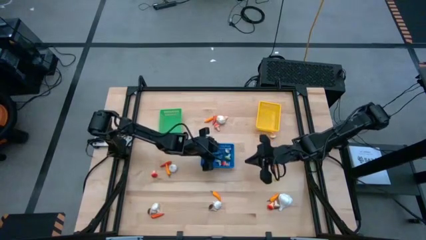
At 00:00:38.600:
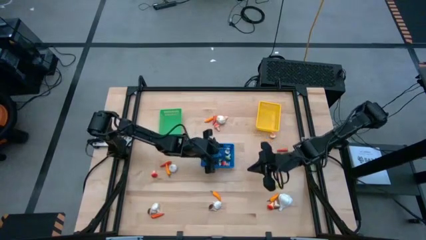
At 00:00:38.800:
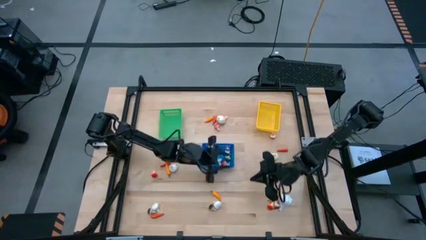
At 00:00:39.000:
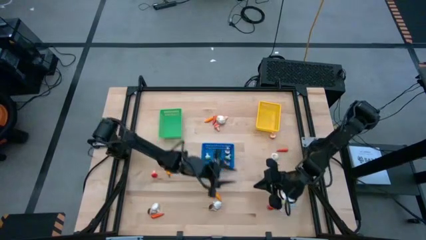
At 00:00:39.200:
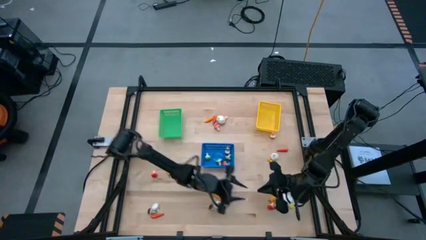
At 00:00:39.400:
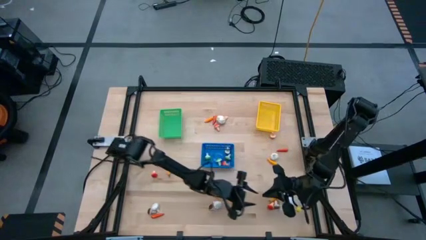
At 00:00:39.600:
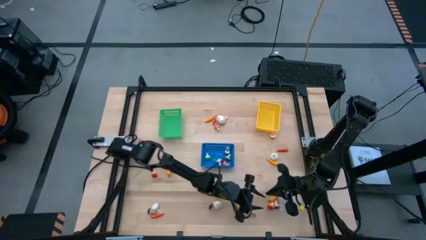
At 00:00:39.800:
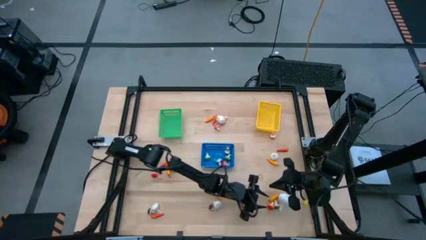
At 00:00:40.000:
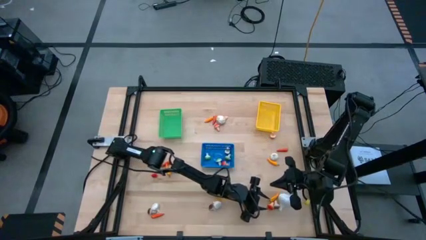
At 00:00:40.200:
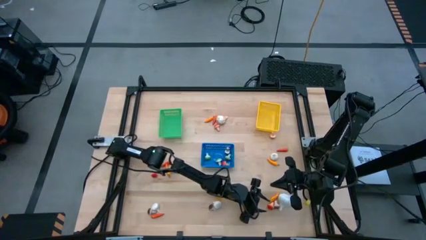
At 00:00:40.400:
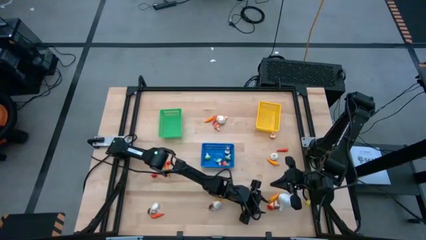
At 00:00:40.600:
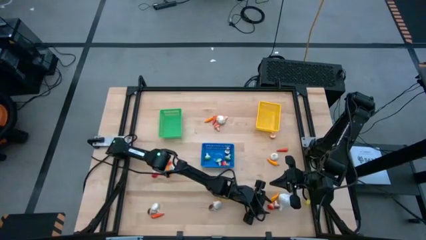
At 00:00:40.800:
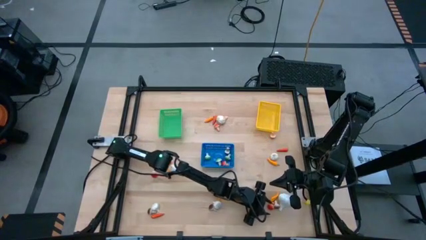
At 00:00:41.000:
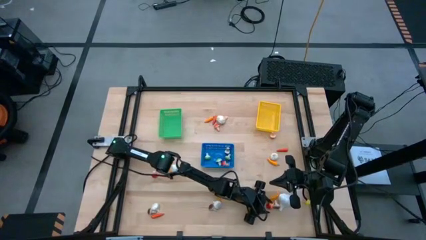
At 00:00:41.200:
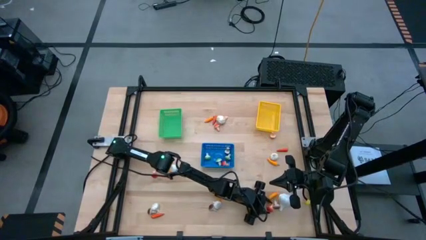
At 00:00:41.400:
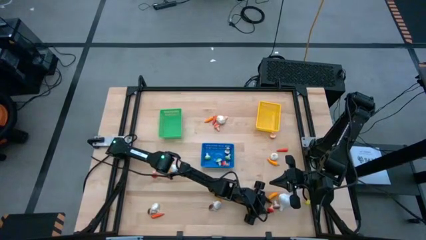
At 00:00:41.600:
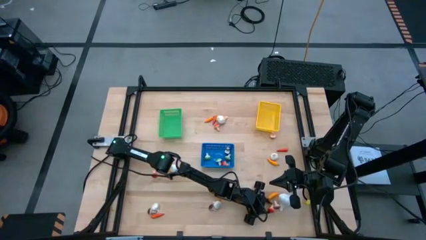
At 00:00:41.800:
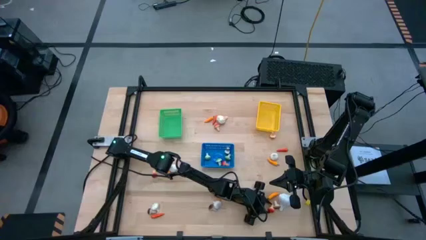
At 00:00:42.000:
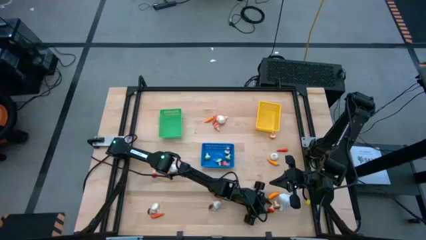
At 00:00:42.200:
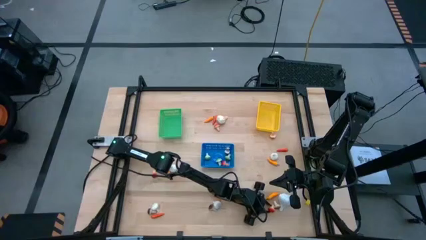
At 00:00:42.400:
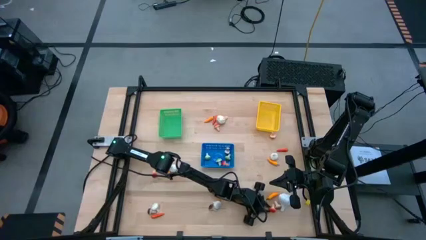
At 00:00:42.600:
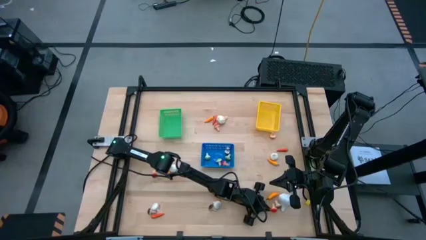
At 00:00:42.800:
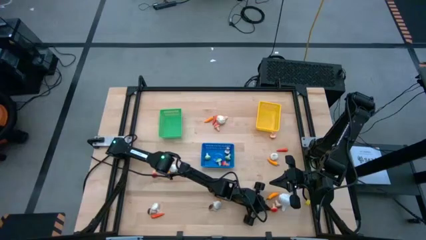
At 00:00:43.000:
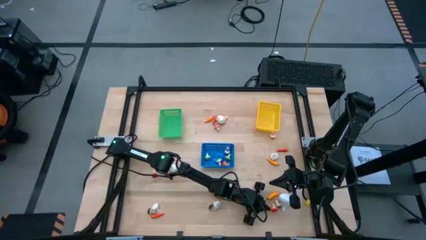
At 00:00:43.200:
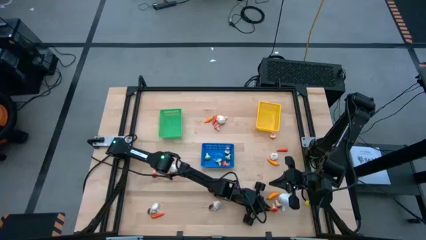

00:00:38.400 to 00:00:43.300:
Task: Sort produce into baskets
Put the orange mushroom into the blue bin

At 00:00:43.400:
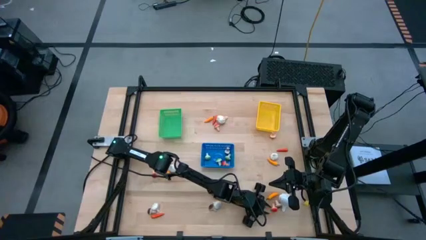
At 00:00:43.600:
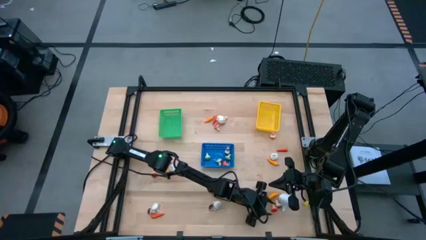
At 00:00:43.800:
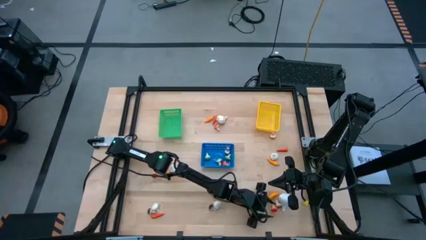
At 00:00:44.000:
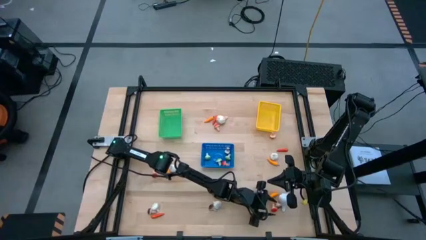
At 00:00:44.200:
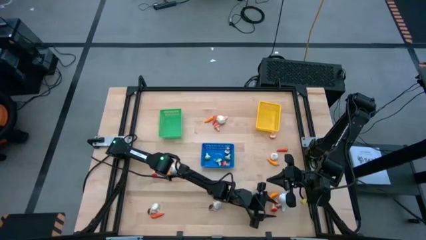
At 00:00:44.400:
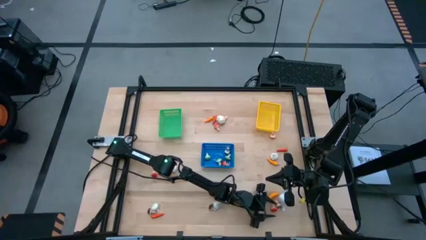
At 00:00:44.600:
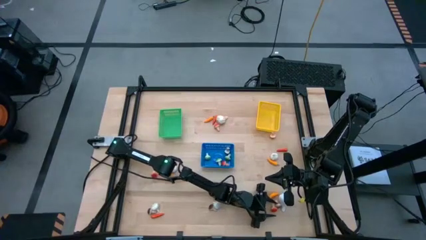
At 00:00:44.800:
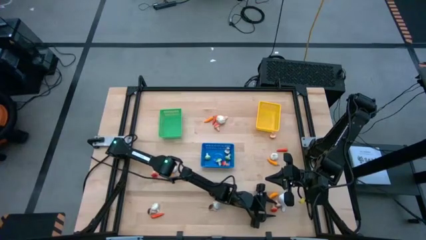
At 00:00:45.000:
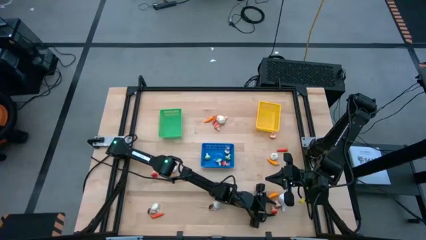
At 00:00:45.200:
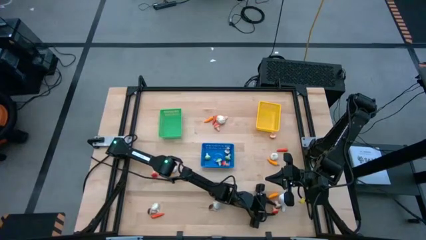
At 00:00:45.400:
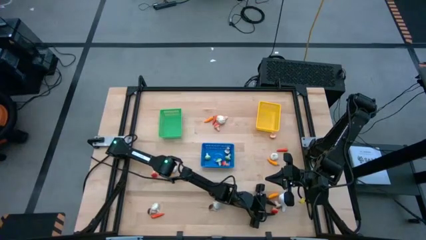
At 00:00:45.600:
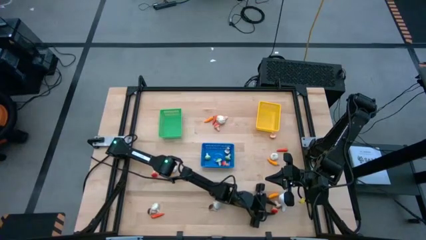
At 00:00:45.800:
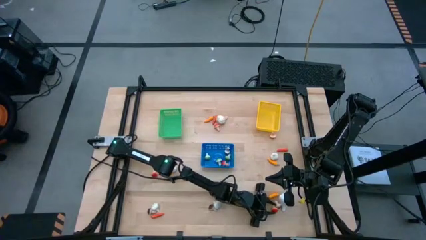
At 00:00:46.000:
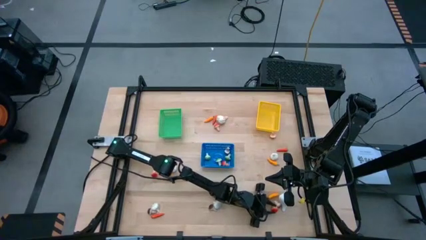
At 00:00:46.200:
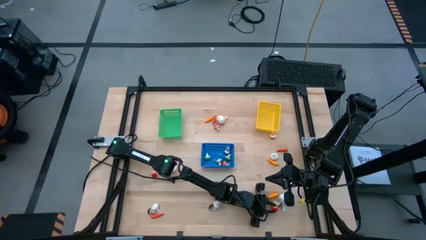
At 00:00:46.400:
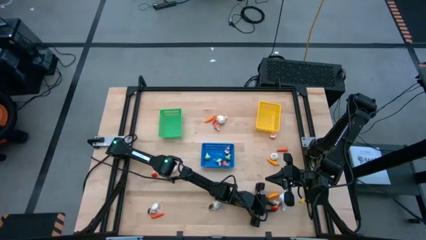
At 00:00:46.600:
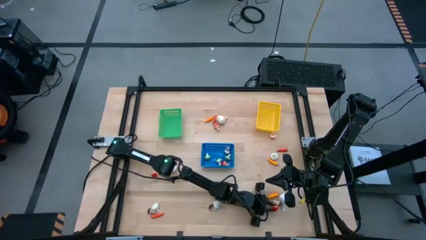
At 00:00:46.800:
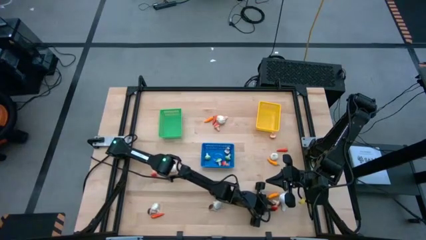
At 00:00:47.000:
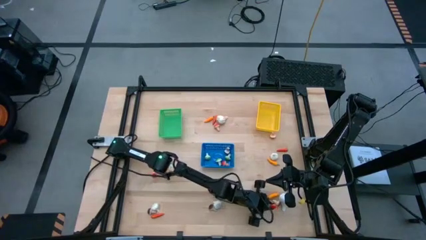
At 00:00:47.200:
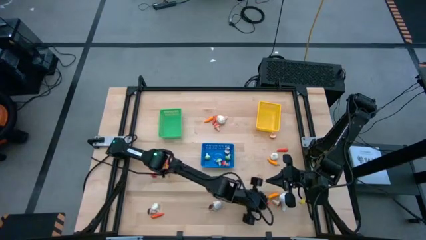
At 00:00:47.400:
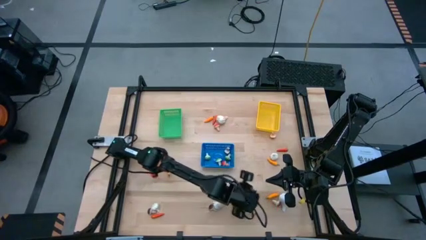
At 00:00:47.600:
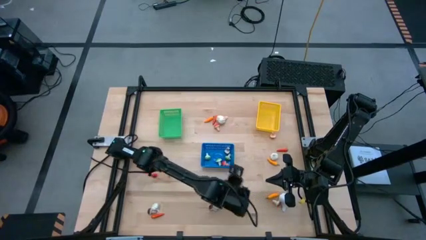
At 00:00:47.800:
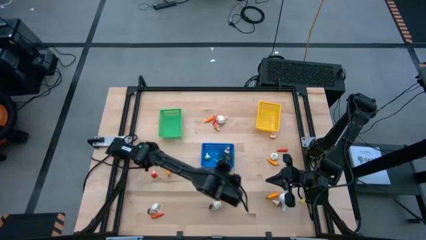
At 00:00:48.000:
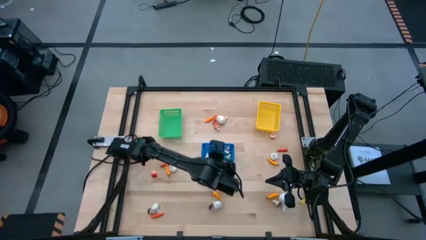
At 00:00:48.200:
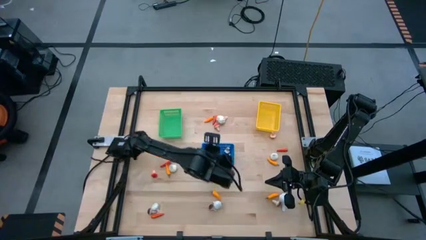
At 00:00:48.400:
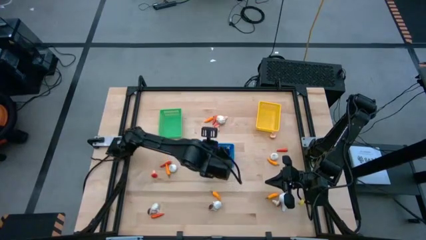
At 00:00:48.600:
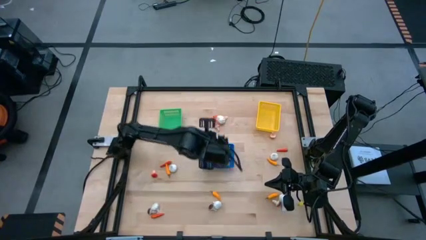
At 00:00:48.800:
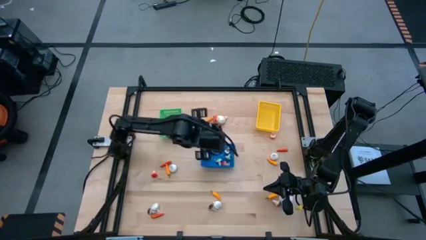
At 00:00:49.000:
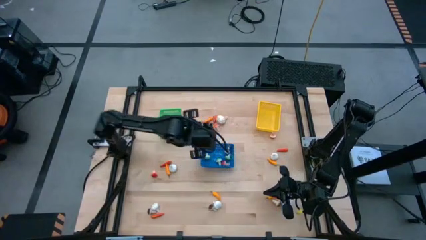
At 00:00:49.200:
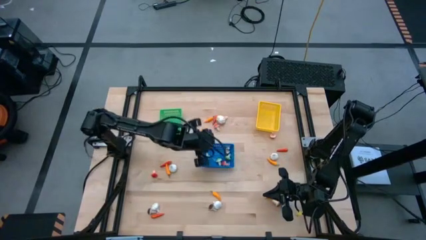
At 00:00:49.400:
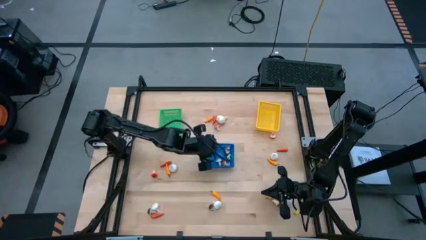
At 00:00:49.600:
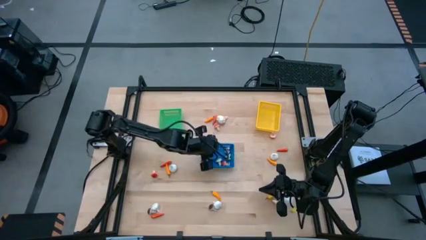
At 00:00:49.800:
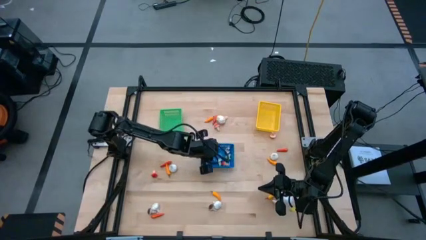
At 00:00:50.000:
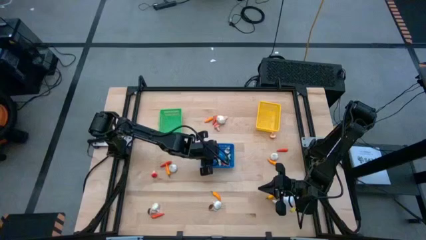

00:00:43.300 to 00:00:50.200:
Put the orange mushroom into the blue bin

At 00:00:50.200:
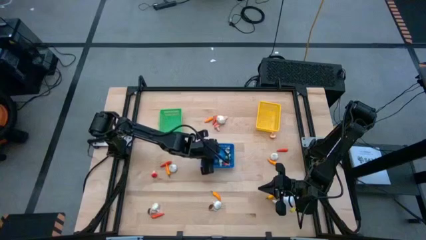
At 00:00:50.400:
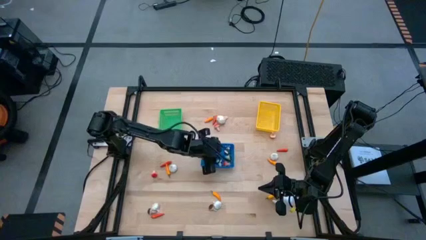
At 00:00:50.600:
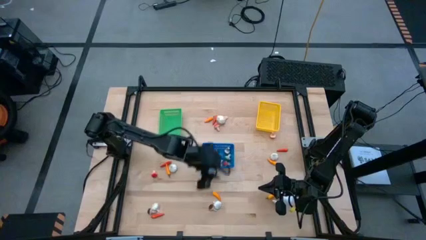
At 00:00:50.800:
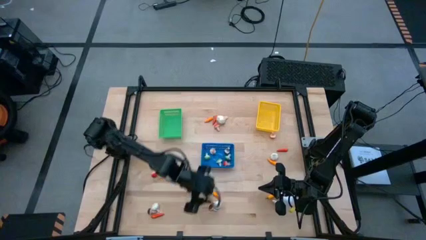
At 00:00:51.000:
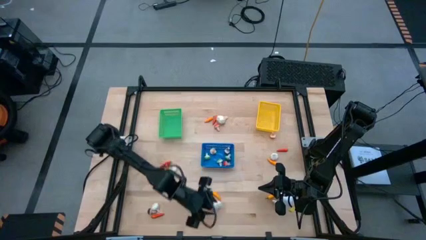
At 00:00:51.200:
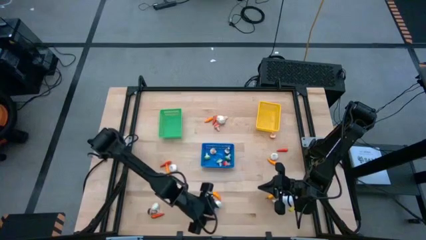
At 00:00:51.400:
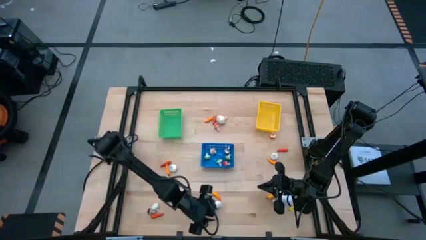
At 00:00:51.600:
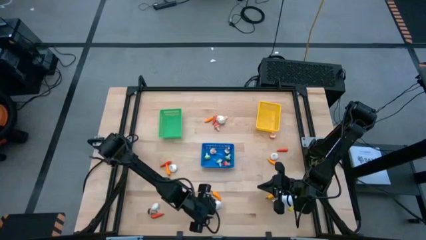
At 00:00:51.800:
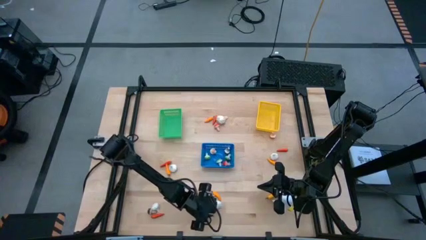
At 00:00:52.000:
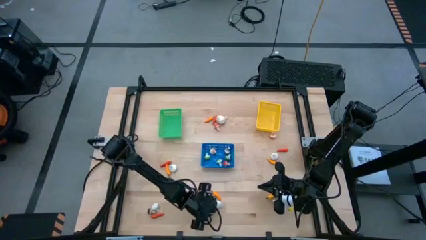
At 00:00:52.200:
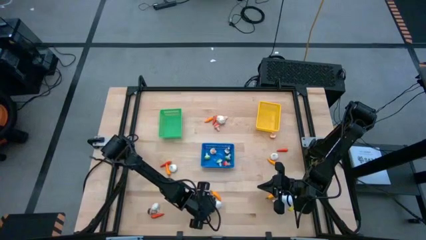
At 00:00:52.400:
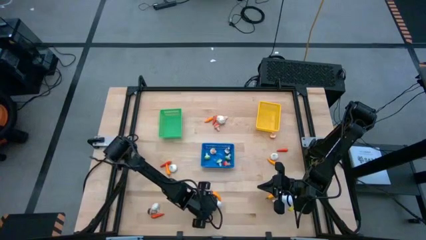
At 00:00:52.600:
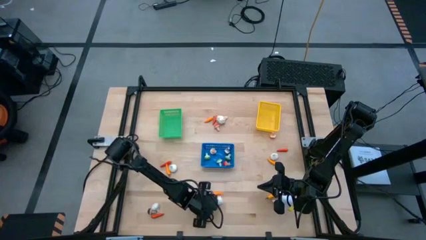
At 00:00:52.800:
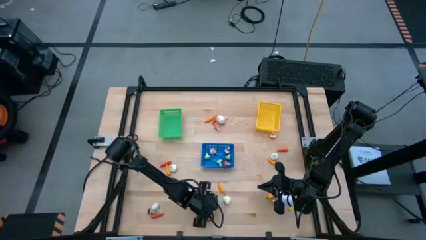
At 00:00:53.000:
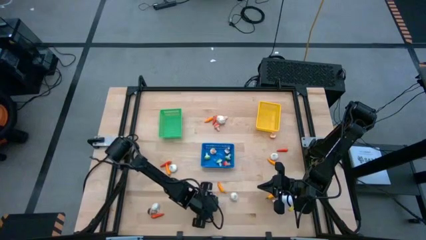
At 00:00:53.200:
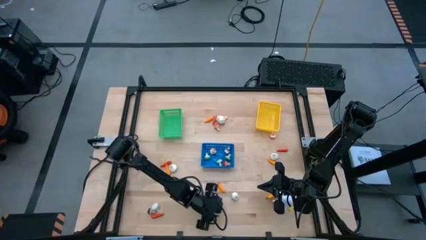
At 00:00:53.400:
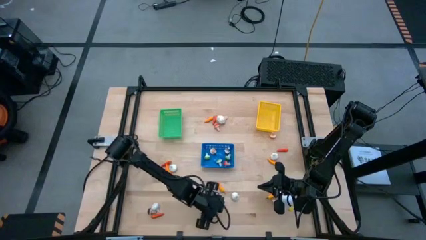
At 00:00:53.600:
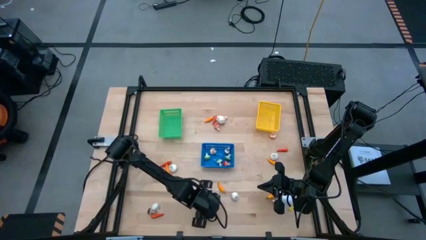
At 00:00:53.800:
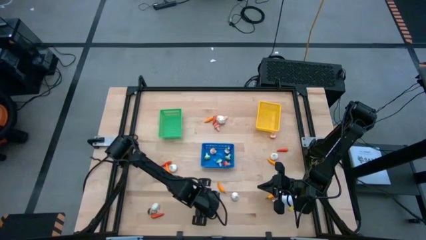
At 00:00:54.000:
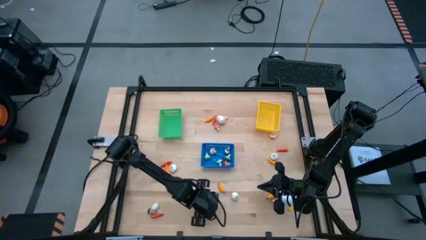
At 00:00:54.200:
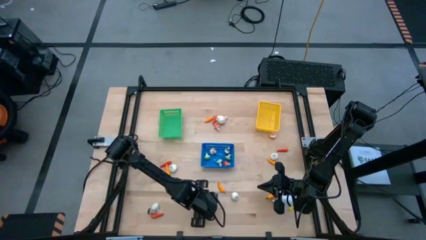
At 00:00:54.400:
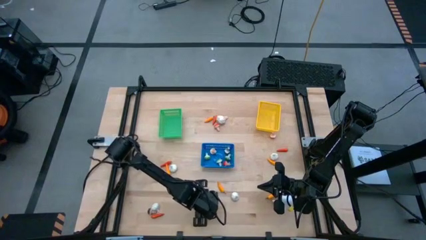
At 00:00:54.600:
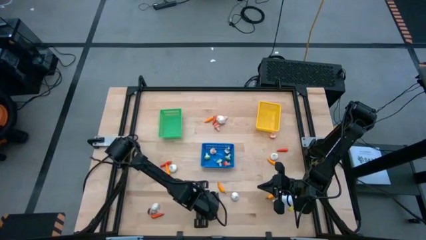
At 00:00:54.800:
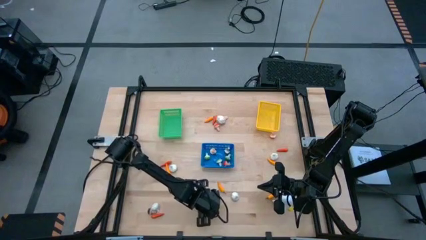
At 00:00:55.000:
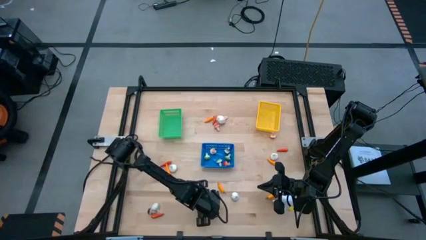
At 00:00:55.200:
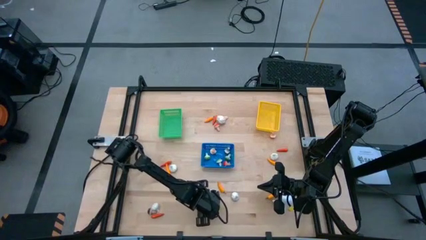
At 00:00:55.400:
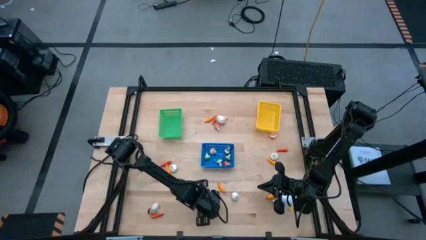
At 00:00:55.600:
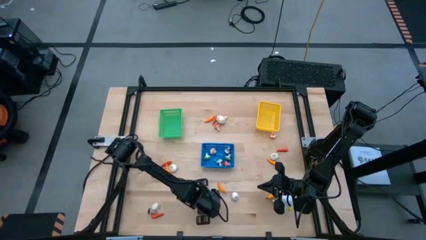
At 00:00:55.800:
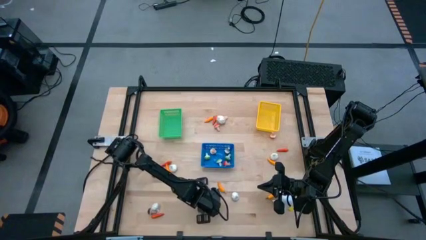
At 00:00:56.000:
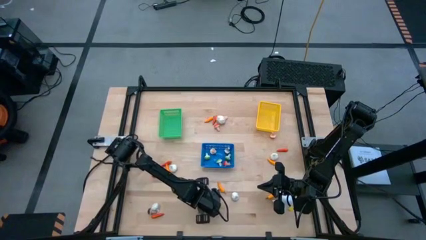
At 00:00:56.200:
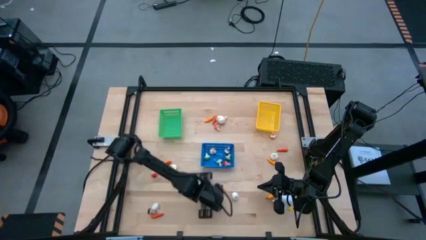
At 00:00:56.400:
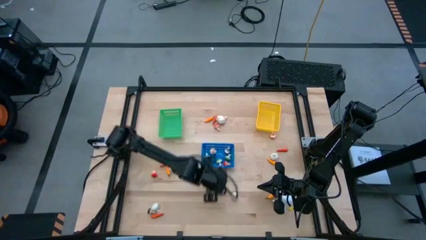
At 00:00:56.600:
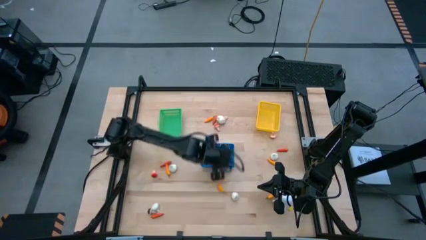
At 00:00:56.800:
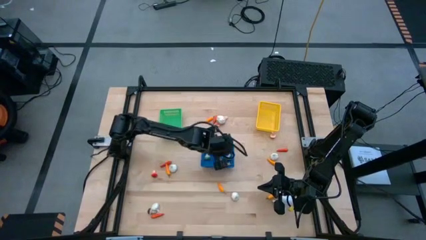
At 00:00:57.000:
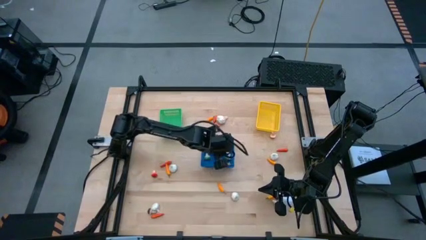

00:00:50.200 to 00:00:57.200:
Put the brown mushroom into the blue bin
